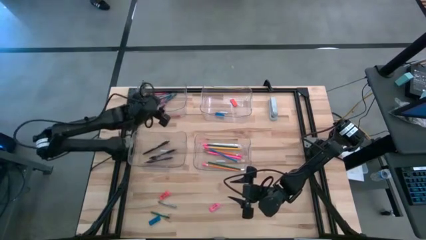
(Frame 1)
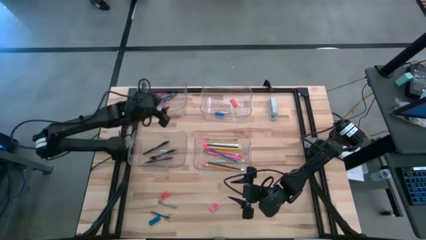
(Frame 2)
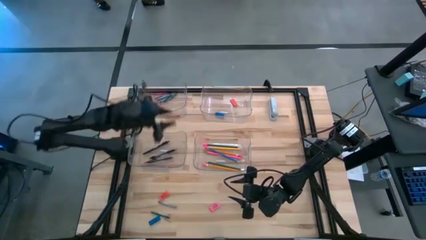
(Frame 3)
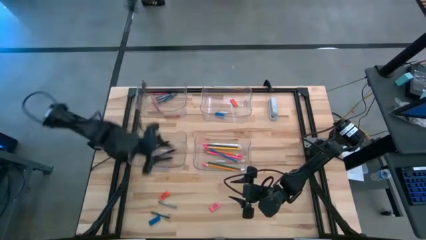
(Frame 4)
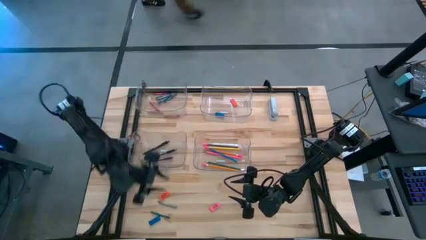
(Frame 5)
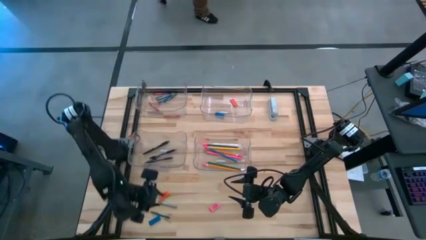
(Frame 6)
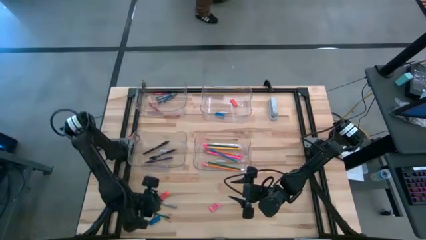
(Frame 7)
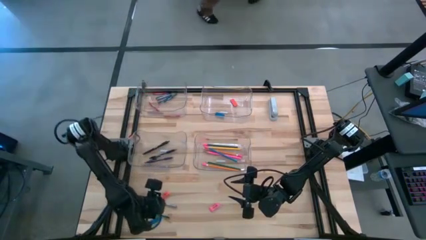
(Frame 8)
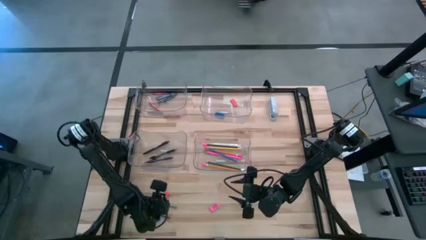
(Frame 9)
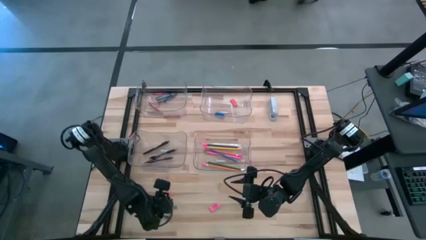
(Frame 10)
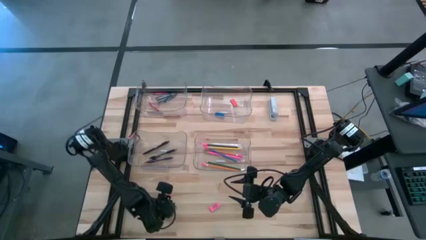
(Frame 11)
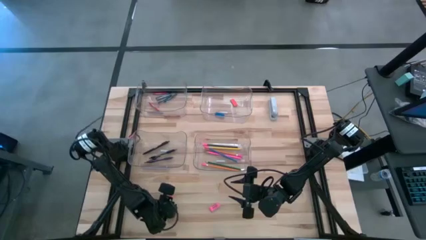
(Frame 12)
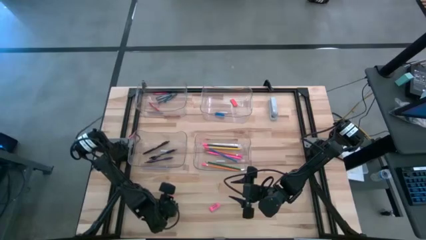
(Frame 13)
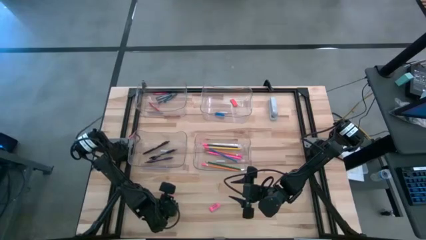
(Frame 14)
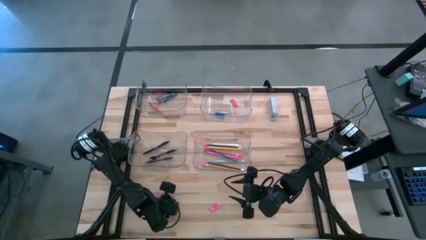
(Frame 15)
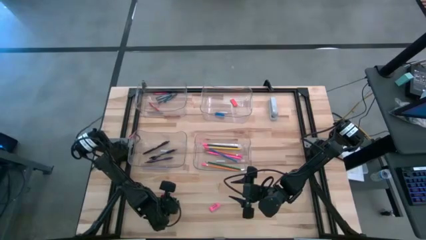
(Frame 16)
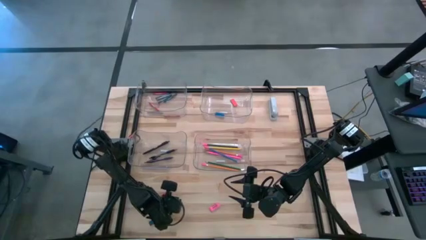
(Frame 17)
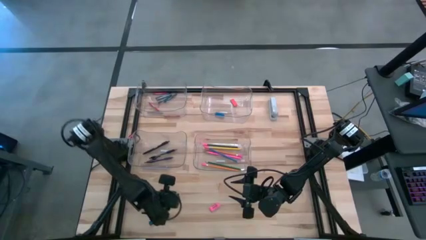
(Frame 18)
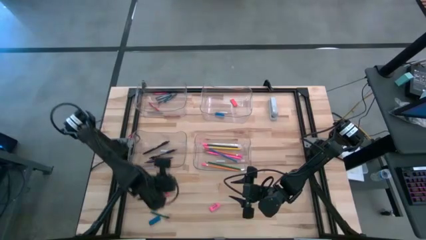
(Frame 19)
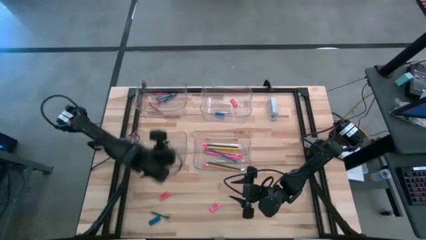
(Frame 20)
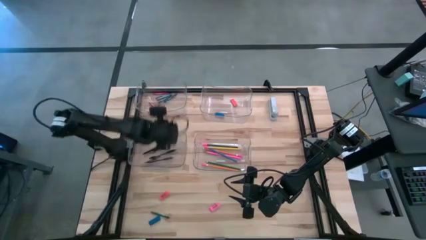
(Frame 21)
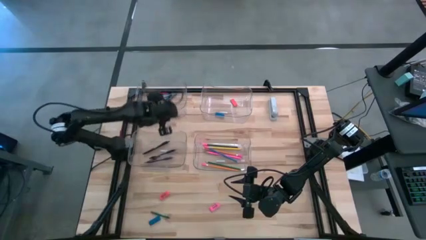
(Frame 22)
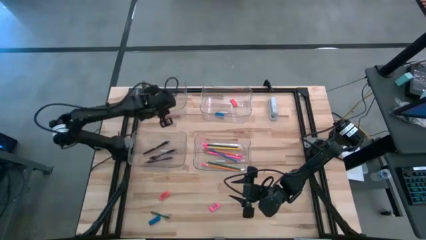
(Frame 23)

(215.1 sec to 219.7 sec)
Task: Sort crayons/erasers/pens/pencils in bins
Put the gray crayon into the top left transparent bin

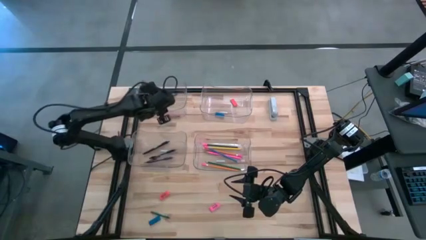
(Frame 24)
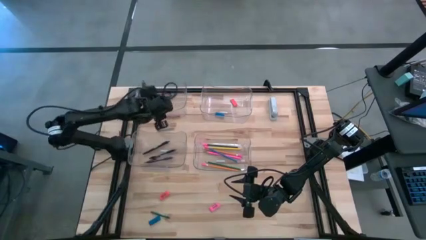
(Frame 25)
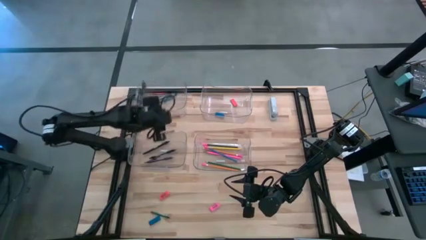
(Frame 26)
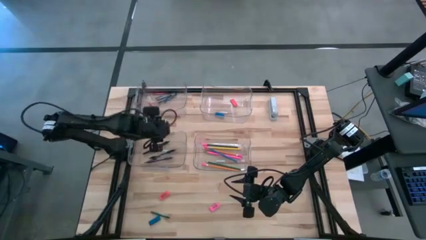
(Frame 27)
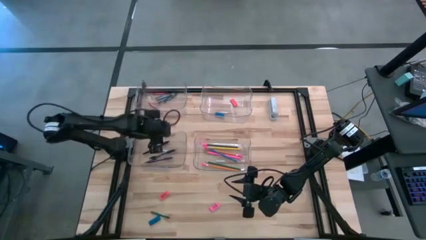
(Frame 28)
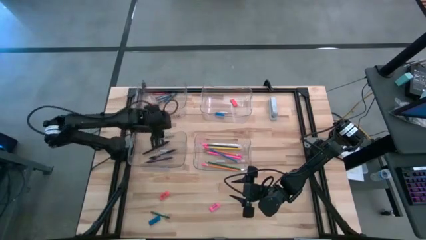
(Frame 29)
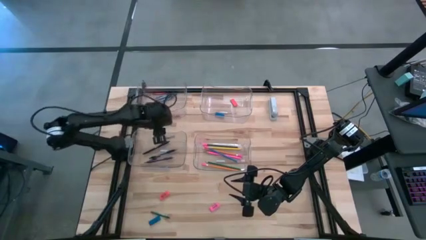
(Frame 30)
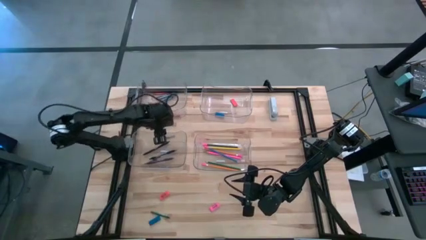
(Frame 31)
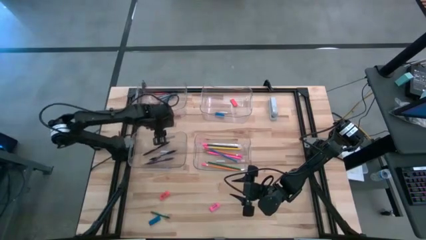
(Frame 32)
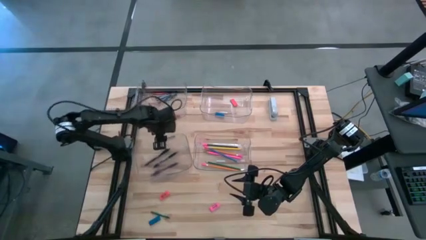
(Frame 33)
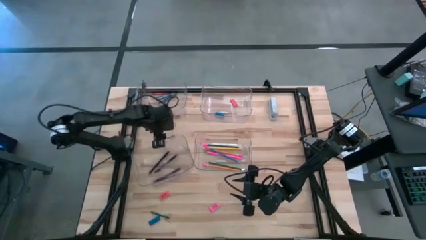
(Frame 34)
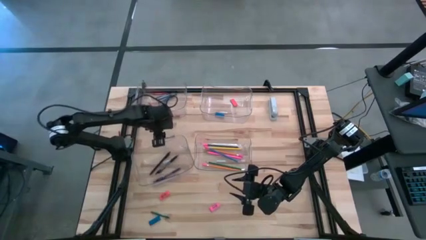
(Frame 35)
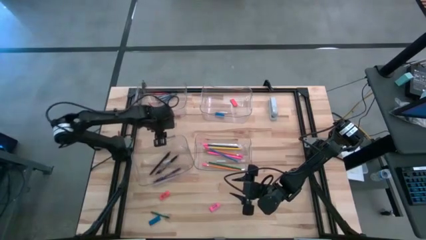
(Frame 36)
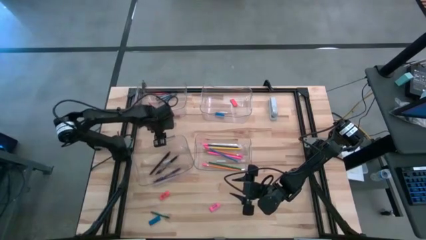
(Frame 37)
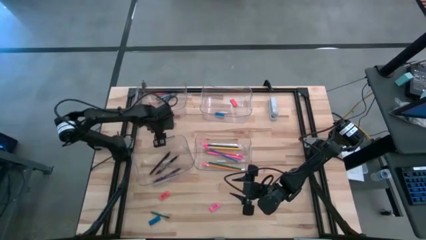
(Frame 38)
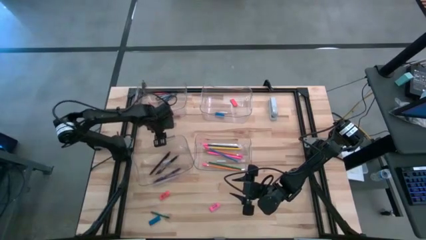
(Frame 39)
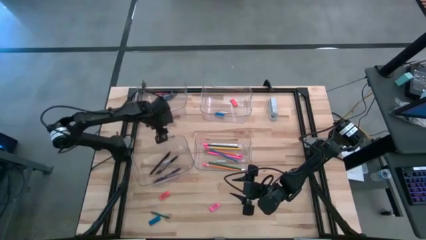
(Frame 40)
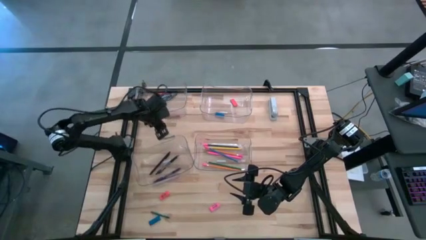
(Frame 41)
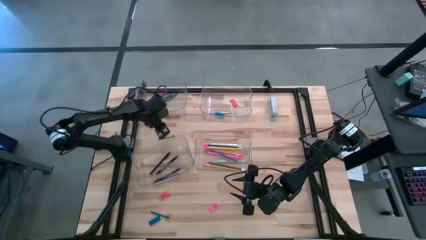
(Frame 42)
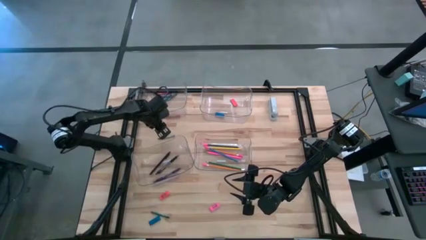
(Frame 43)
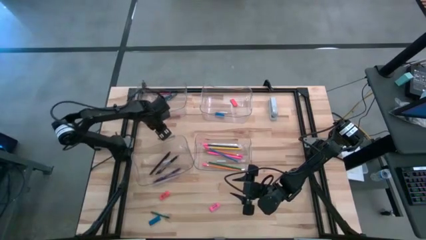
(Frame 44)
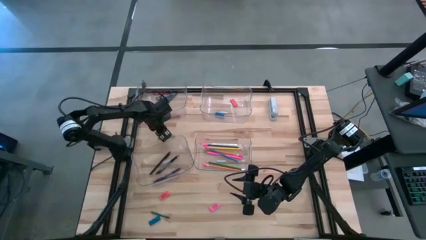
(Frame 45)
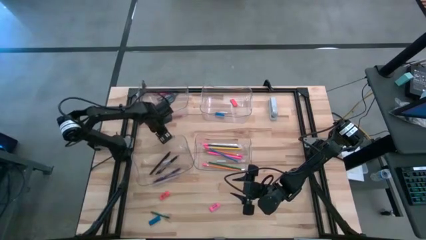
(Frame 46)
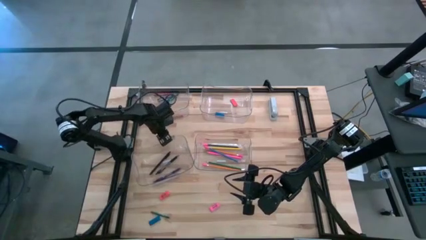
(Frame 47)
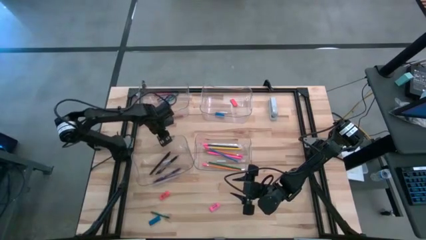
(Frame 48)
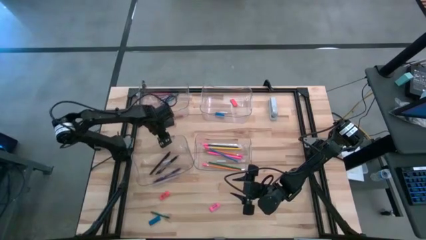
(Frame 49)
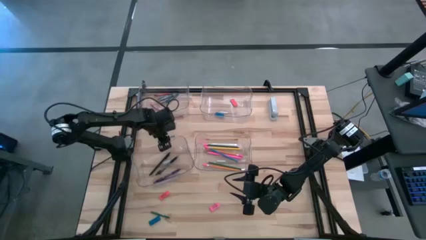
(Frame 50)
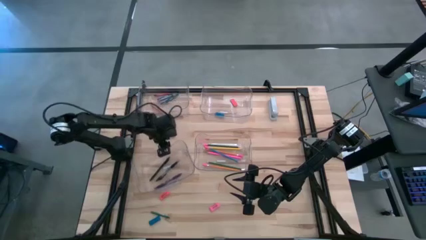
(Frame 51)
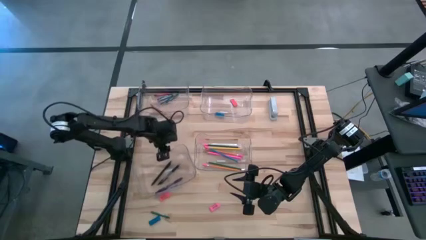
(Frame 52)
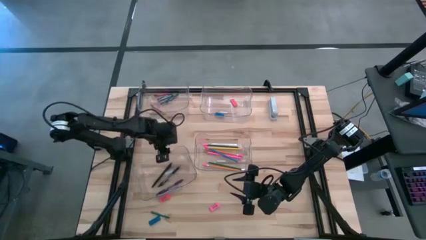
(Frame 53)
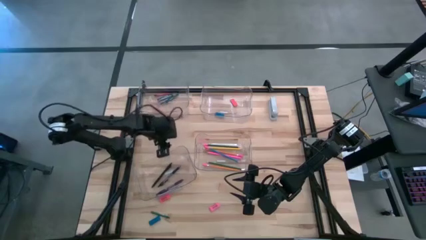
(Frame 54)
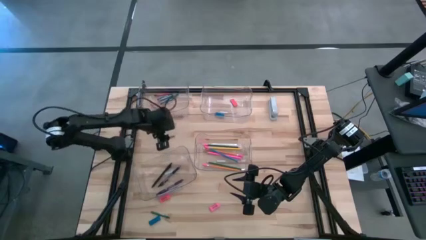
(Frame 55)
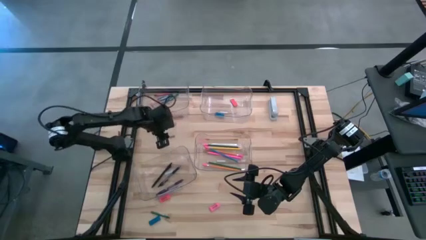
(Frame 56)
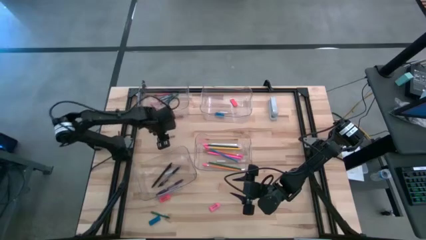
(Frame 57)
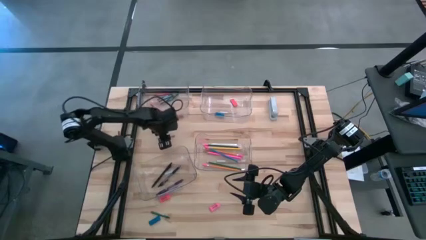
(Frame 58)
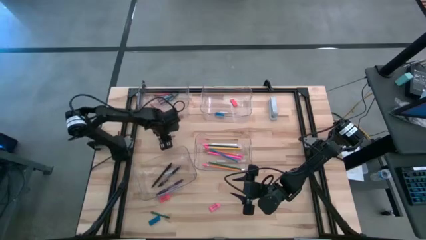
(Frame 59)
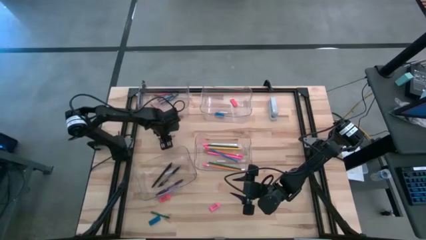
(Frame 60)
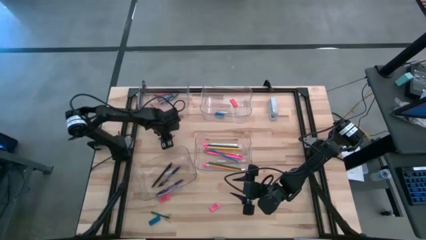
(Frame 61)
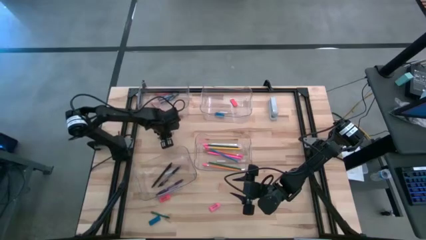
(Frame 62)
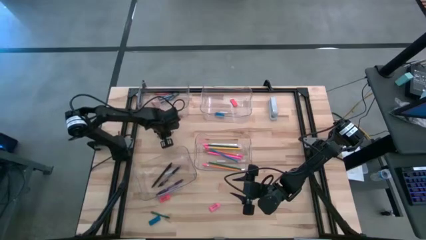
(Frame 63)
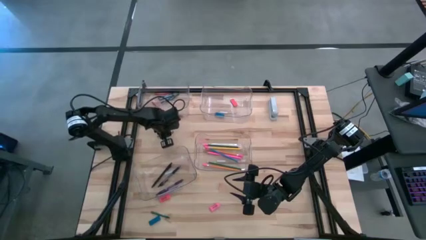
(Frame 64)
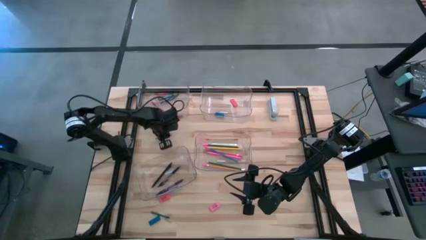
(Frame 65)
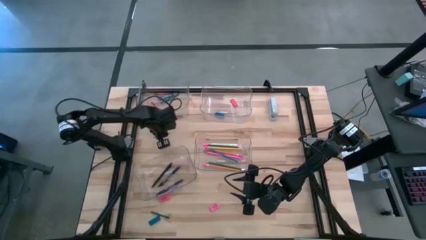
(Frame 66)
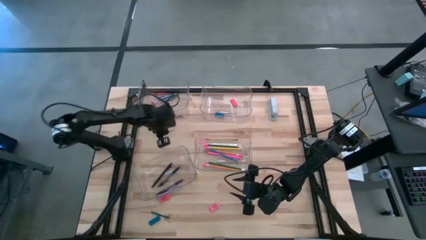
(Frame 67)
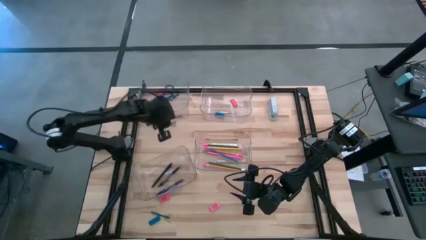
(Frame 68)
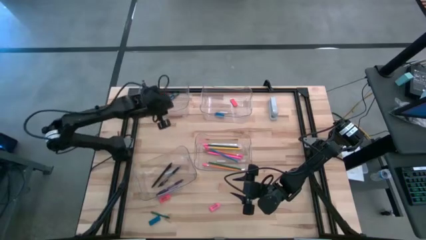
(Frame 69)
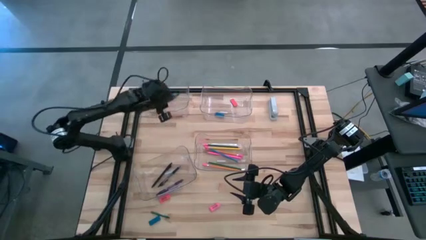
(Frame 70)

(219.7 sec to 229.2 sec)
Put the gray crayon into the top left transparent bin

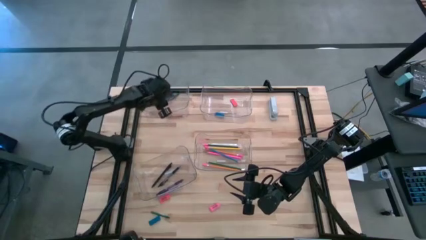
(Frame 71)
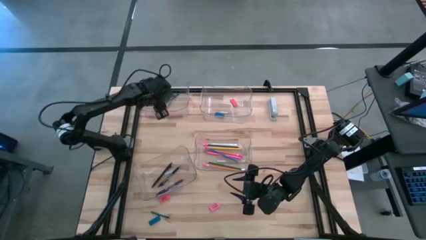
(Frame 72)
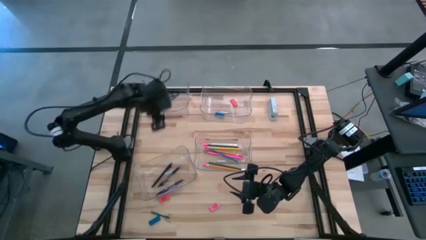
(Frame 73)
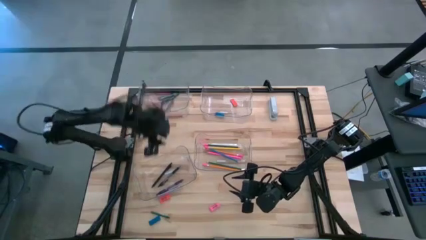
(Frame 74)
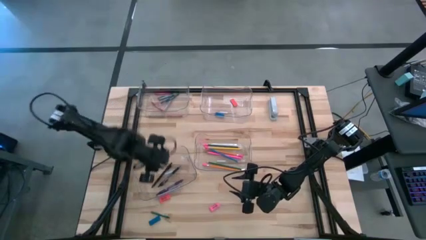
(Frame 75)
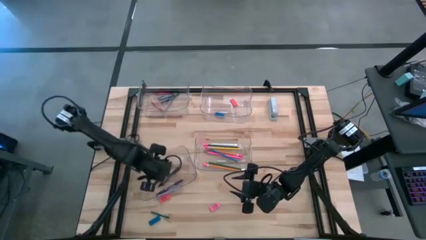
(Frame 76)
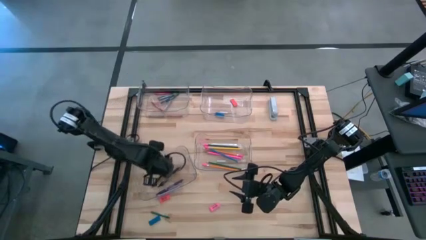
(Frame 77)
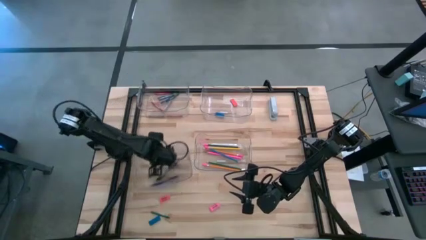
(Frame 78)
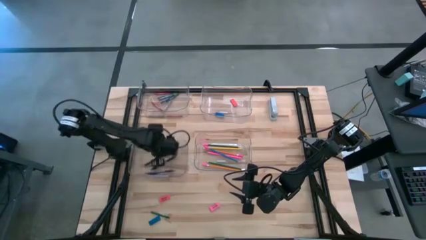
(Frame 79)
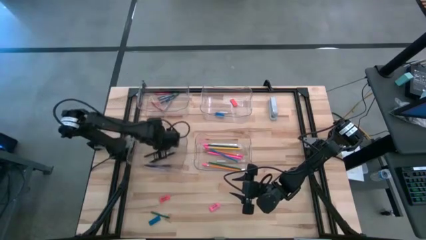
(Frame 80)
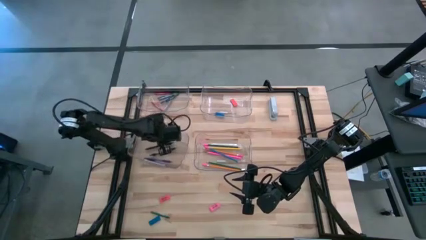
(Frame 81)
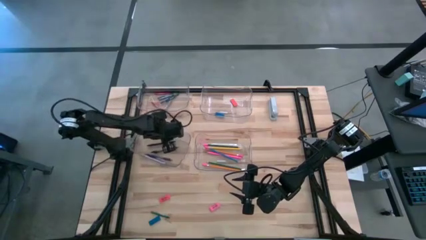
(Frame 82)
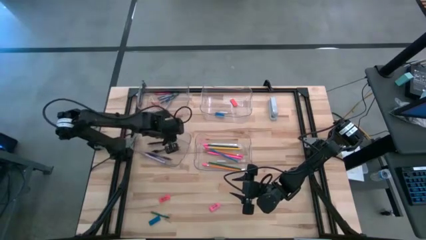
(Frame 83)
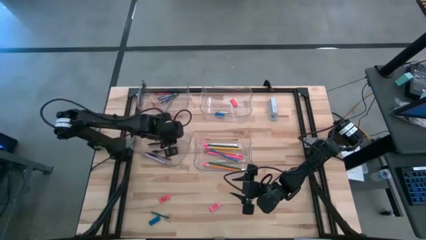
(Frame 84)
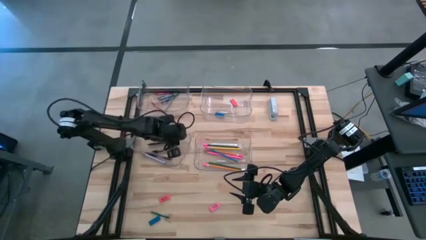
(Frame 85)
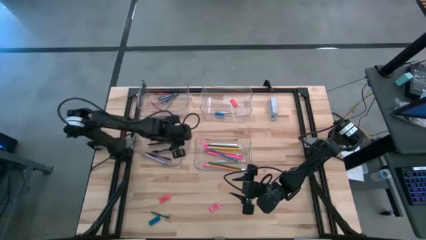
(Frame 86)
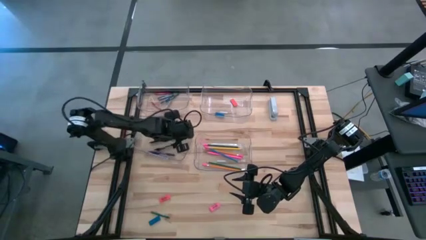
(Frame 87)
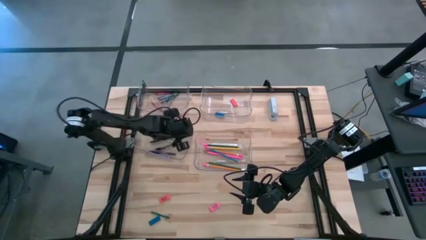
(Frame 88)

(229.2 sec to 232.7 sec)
Adjust the bottom left transparent bin
